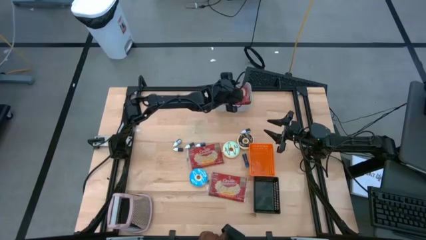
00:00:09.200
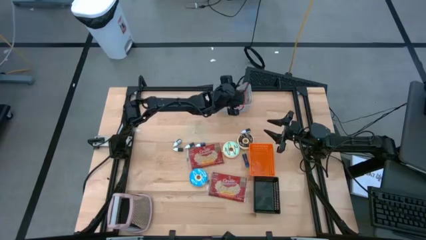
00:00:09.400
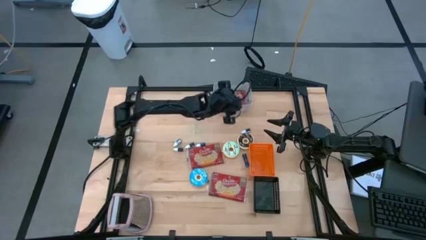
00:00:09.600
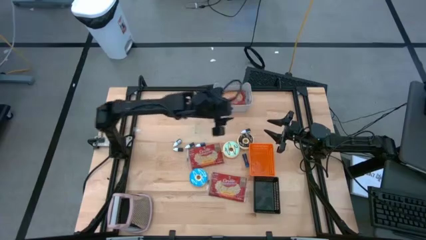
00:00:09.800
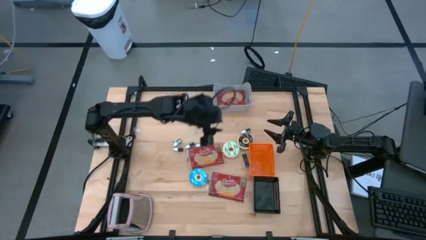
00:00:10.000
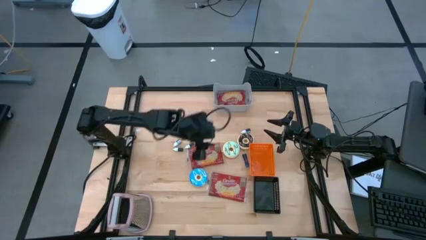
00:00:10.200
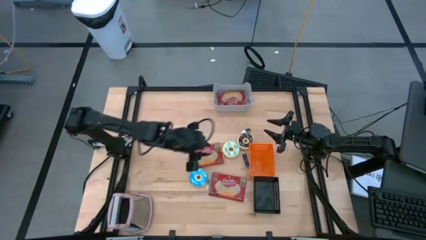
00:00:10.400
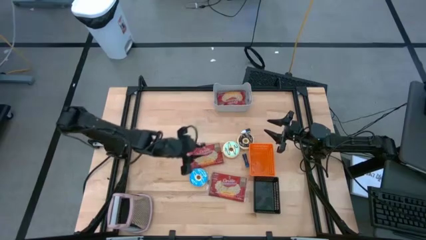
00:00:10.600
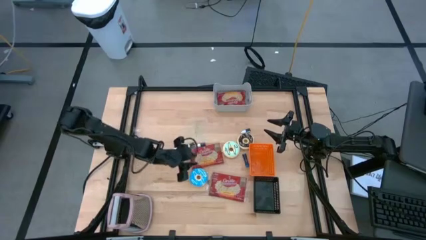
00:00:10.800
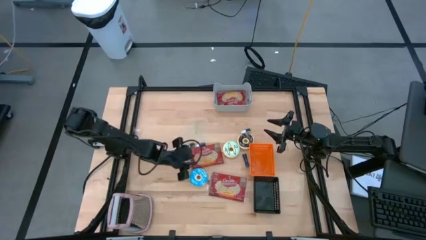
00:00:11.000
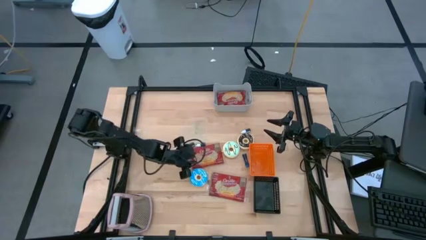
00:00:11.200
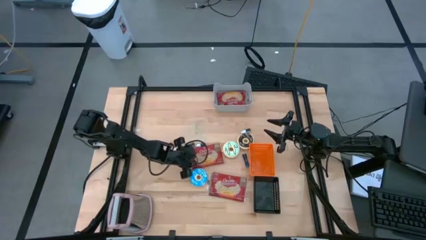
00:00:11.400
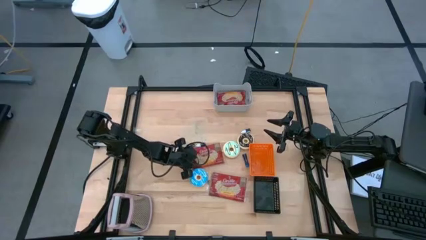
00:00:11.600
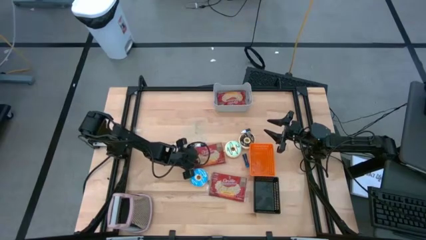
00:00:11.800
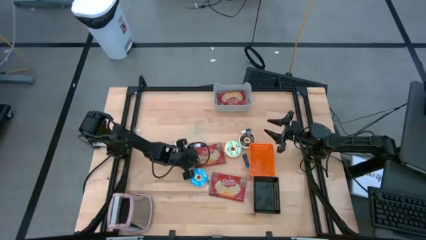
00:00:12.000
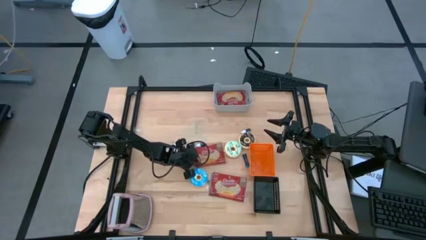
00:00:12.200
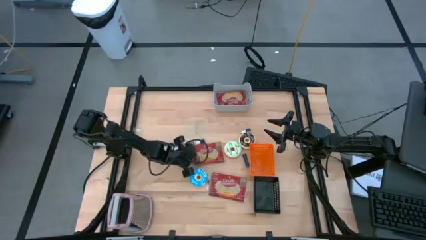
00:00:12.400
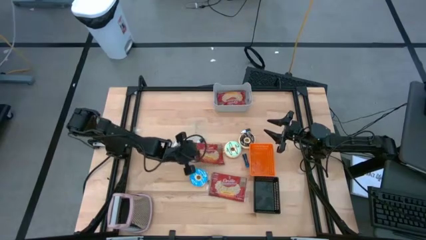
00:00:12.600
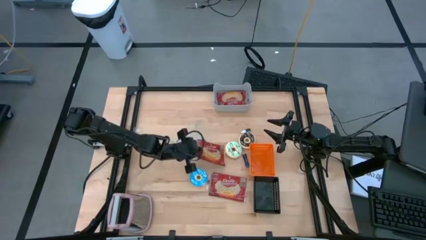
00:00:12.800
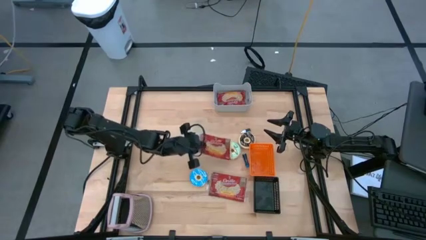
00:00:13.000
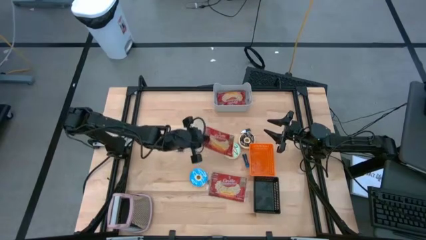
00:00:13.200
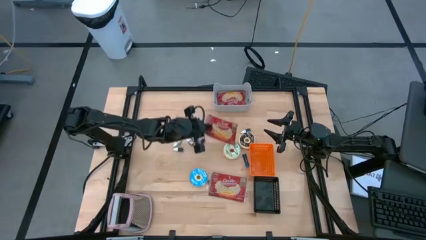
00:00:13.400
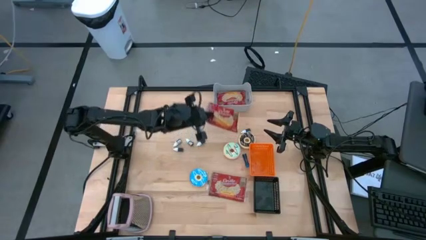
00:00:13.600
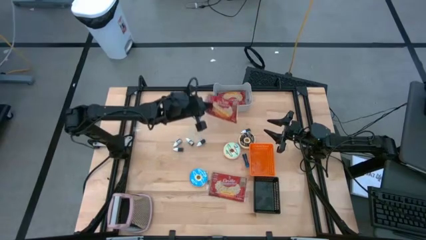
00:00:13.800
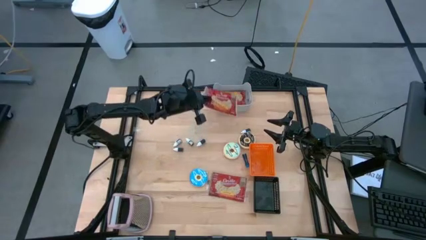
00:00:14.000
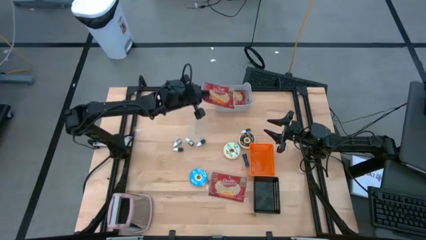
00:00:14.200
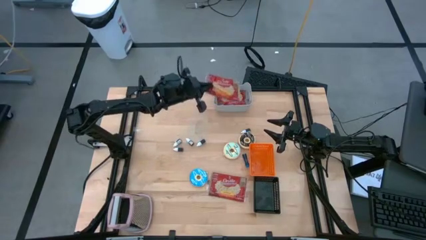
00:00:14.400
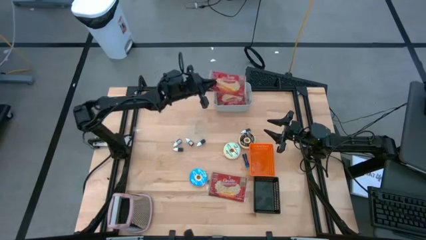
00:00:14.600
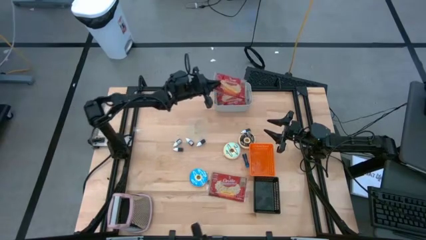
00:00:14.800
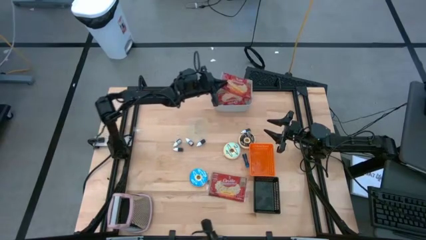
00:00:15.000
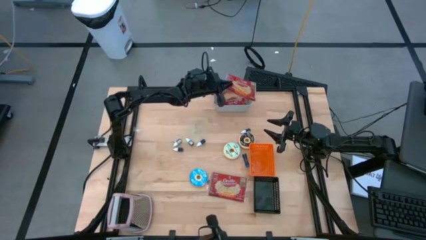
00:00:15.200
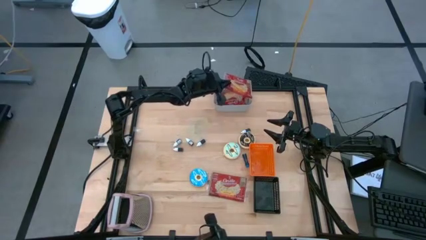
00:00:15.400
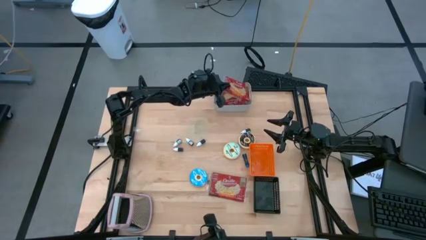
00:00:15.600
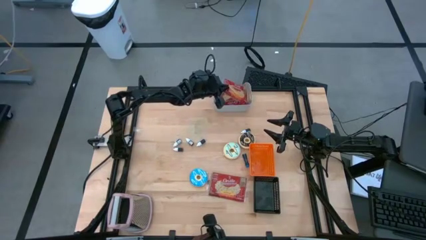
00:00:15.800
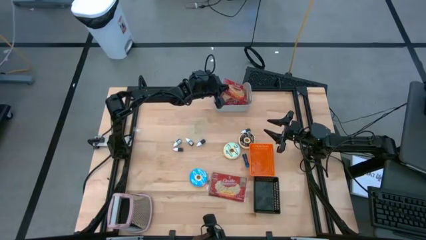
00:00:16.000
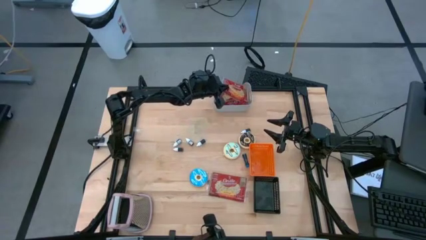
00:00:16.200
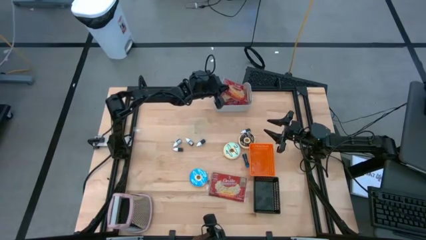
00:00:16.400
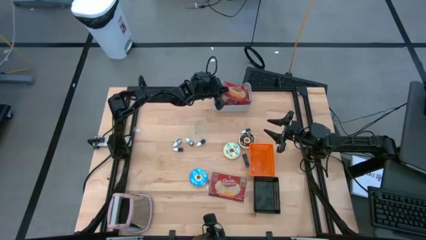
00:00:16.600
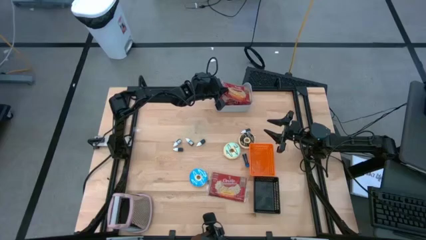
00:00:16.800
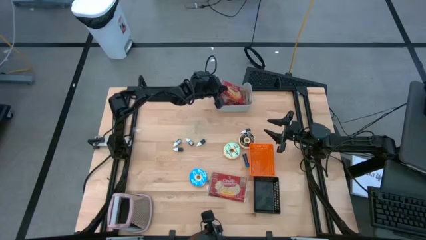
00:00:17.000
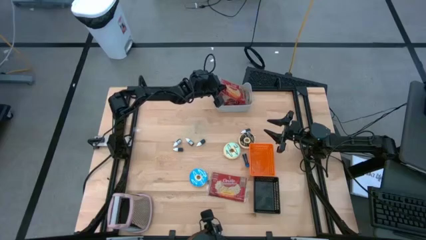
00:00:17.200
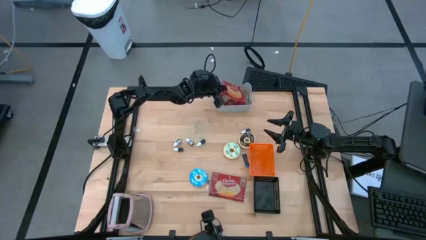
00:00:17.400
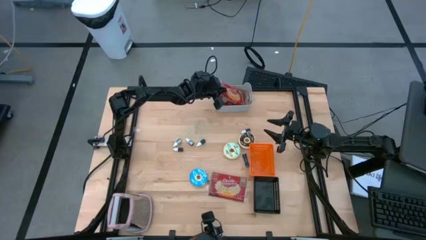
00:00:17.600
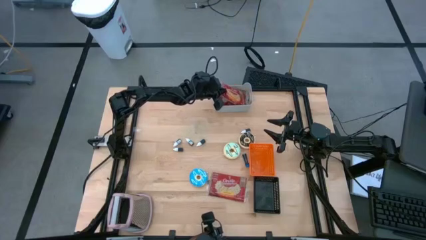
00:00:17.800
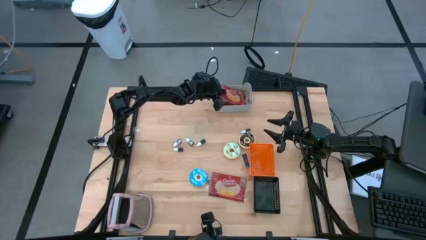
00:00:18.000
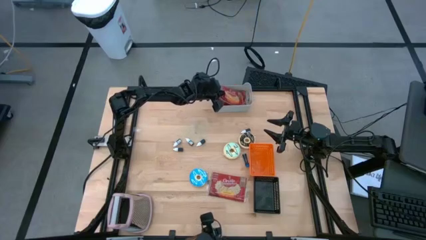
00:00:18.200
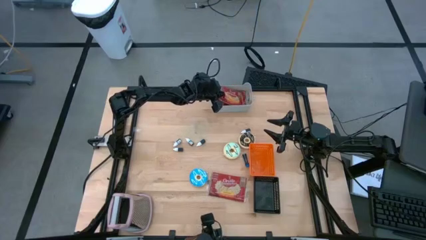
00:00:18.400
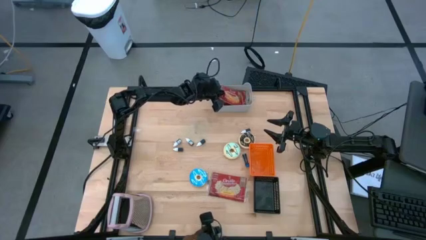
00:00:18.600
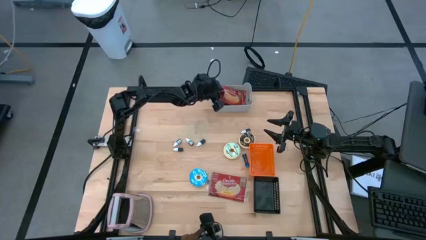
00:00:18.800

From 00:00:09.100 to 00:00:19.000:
Stack the top popcorn bag into the gray bin

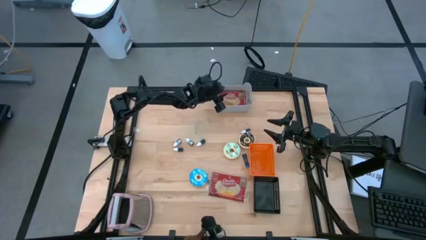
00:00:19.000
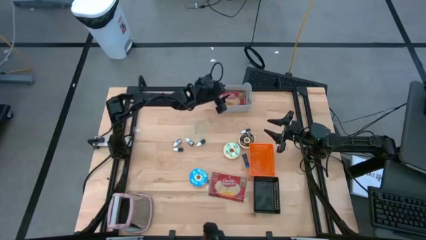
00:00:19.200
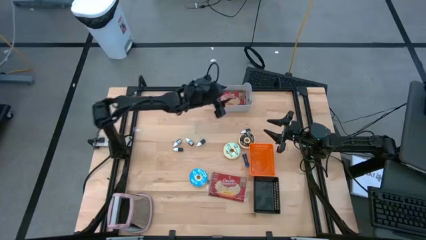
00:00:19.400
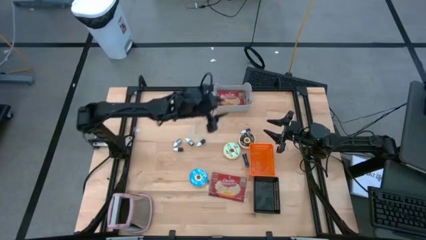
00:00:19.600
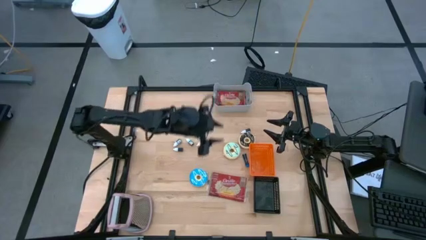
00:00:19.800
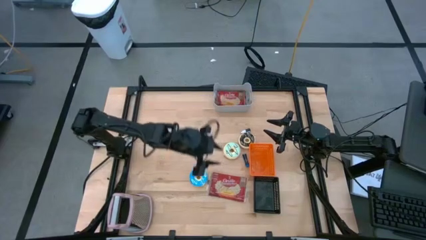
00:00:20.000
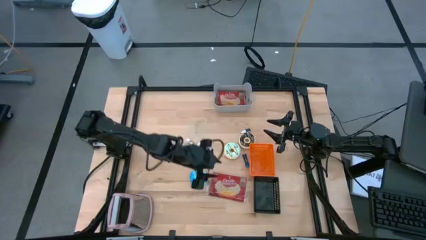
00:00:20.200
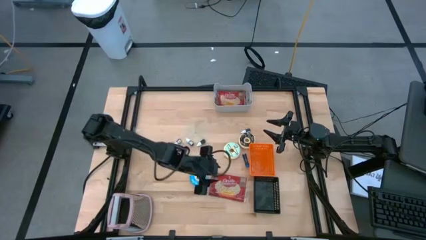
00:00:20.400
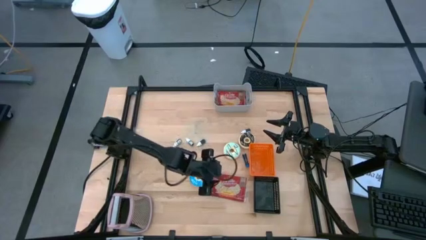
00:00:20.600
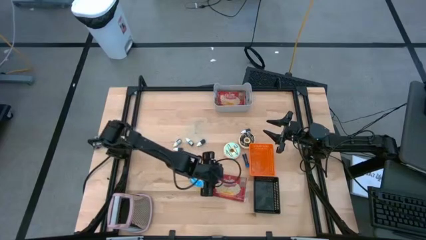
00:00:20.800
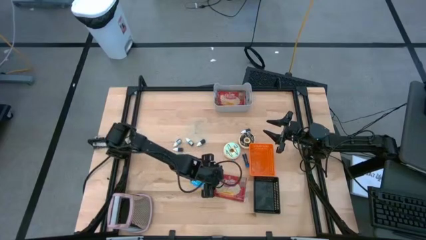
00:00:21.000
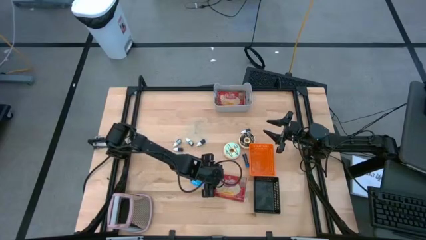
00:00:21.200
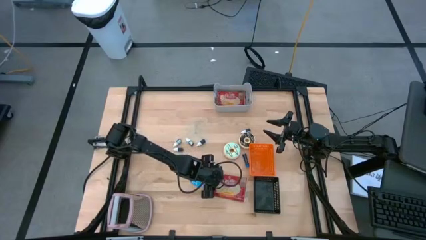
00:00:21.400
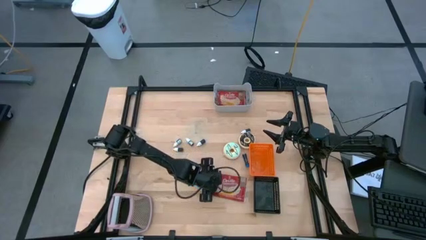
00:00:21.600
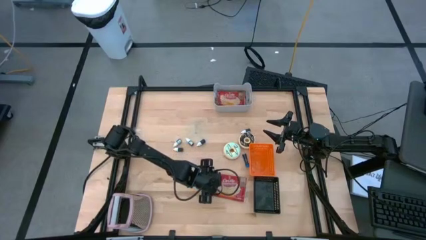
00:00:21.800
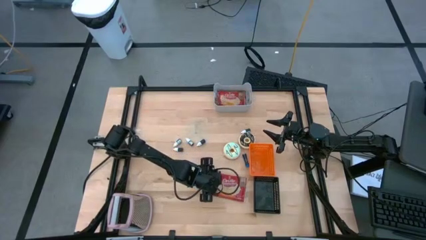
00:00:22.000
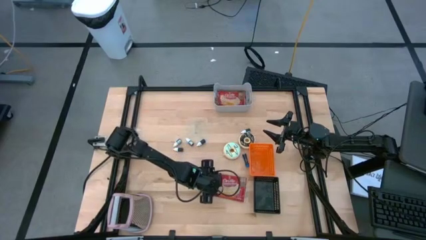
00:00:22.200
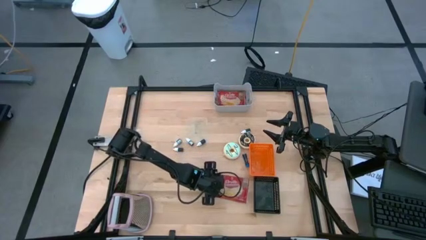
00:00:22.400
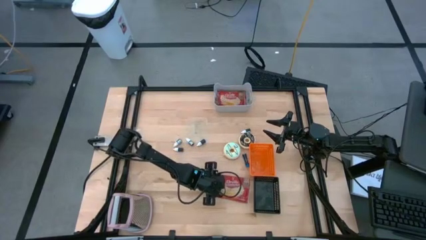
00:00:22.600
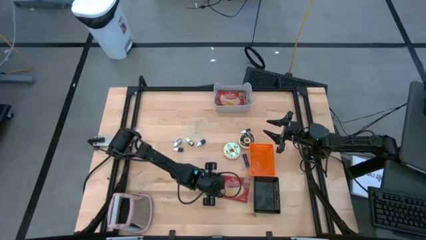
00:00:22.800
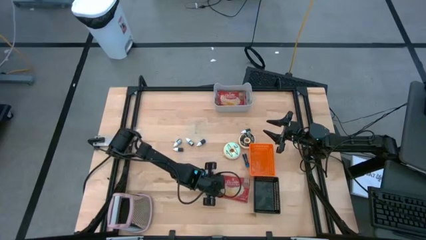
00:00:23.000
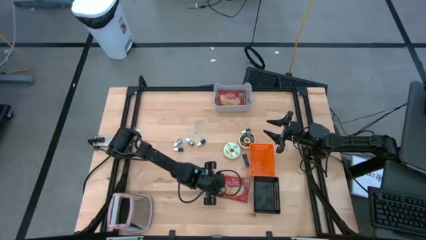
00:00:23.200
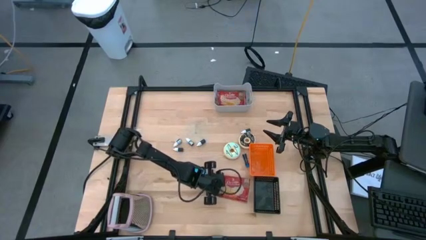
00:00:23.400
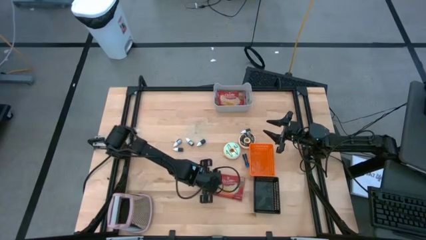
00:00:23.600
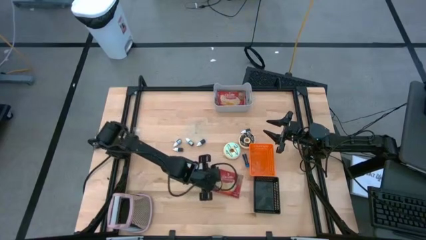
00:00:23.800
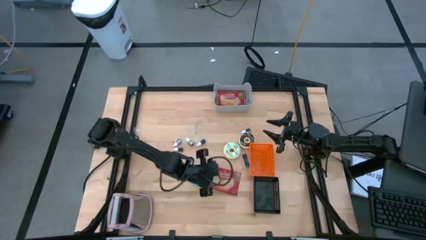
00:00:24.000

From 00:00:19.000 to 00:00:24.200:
Stack the popcorn bag into the gray bin
